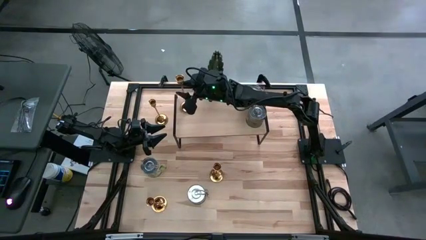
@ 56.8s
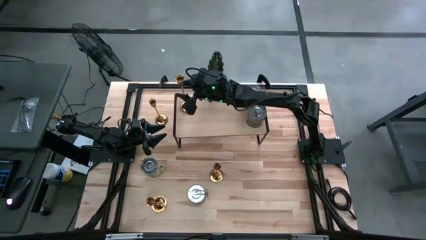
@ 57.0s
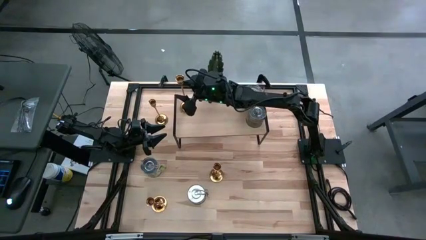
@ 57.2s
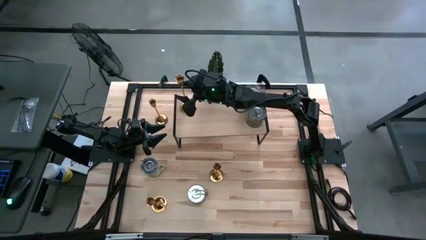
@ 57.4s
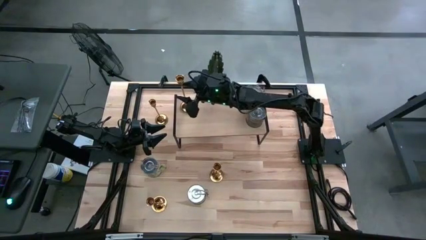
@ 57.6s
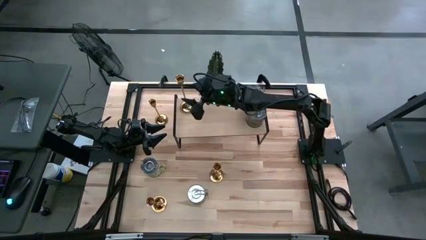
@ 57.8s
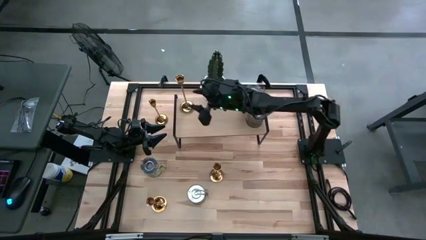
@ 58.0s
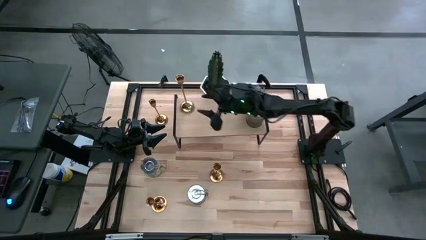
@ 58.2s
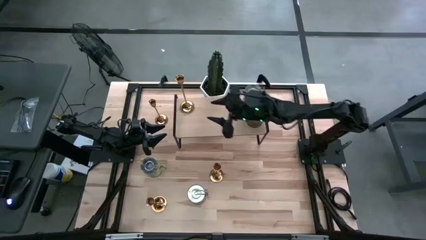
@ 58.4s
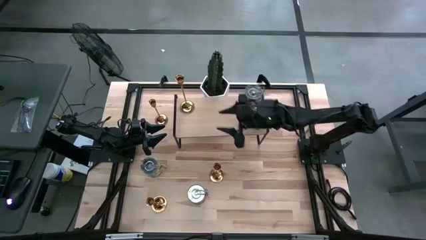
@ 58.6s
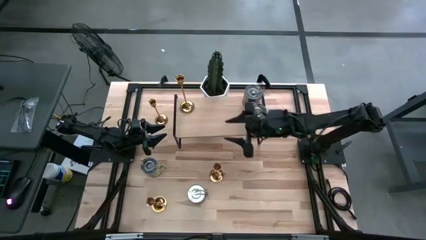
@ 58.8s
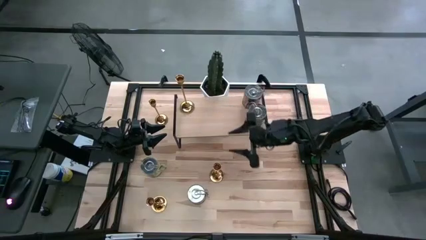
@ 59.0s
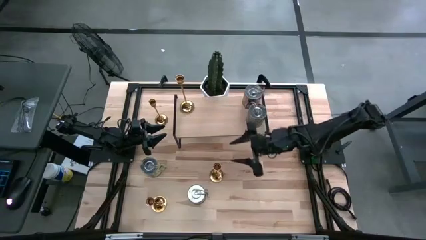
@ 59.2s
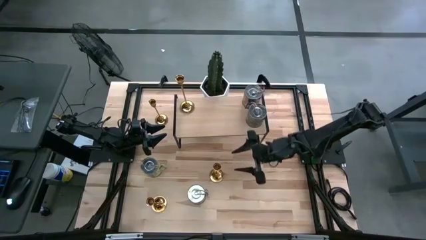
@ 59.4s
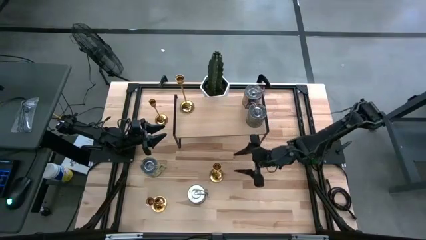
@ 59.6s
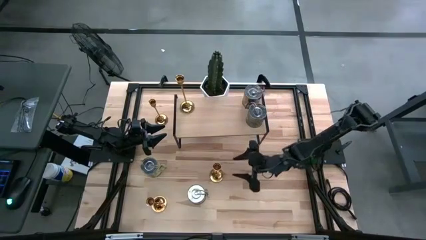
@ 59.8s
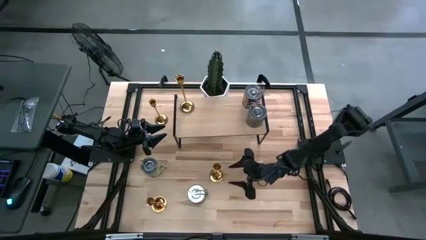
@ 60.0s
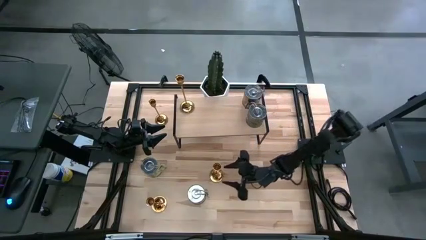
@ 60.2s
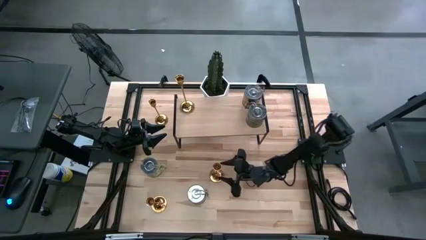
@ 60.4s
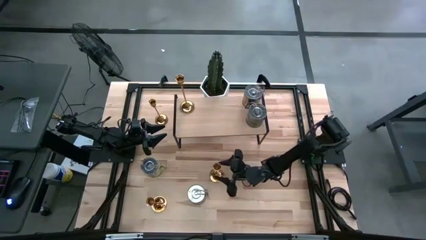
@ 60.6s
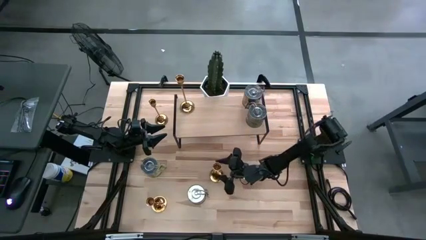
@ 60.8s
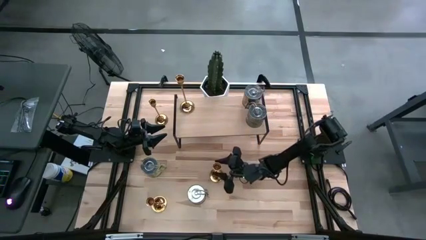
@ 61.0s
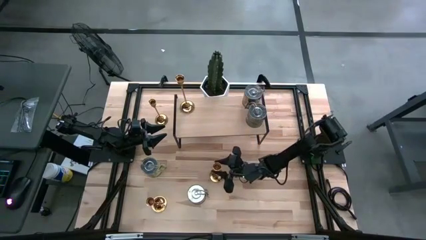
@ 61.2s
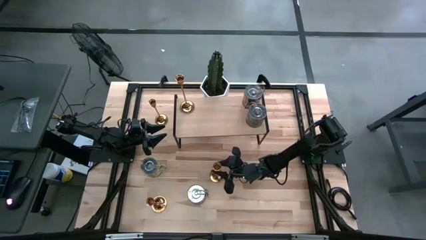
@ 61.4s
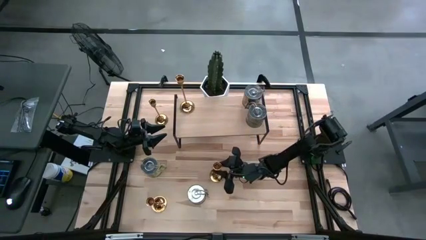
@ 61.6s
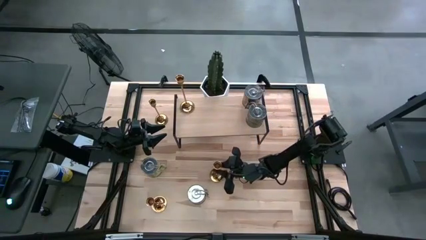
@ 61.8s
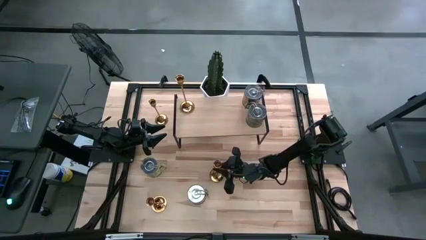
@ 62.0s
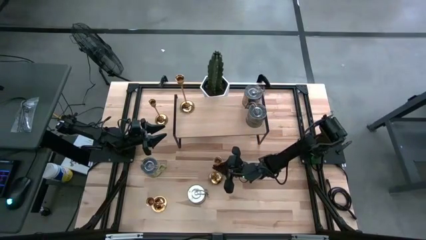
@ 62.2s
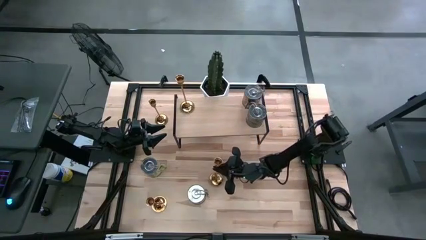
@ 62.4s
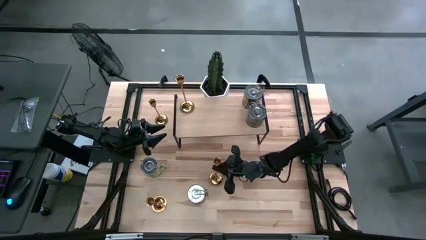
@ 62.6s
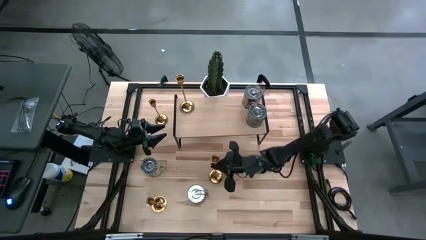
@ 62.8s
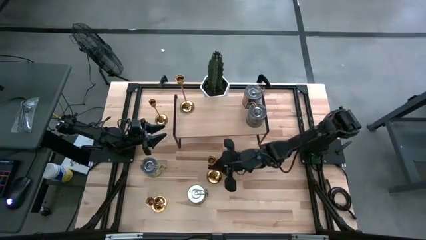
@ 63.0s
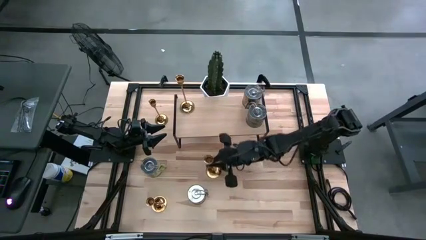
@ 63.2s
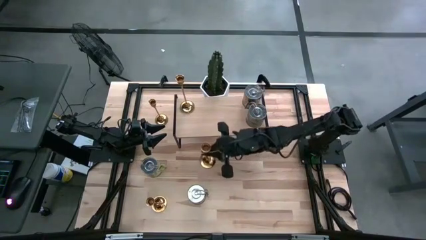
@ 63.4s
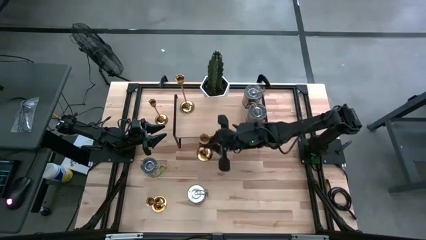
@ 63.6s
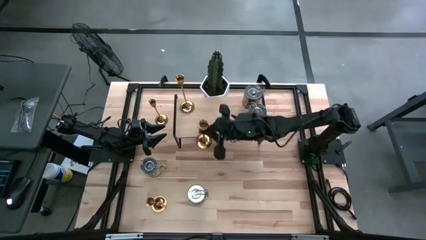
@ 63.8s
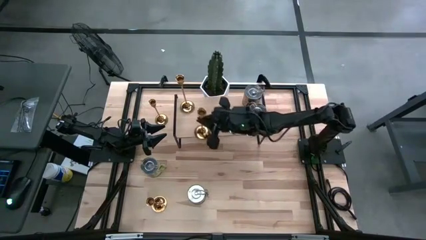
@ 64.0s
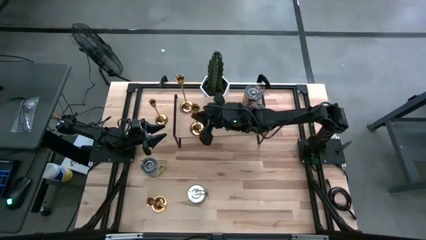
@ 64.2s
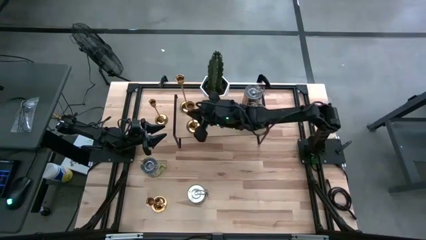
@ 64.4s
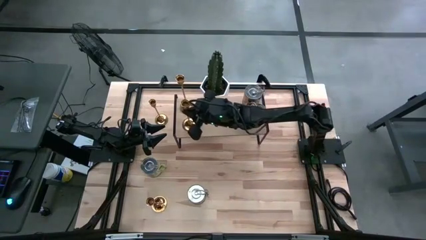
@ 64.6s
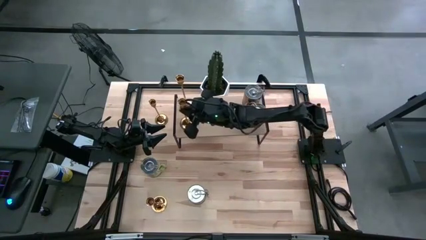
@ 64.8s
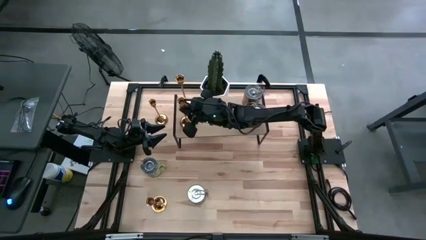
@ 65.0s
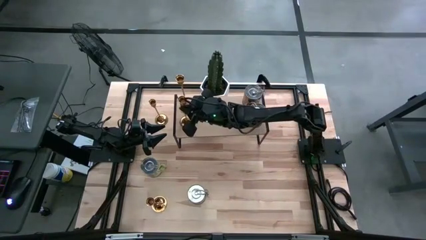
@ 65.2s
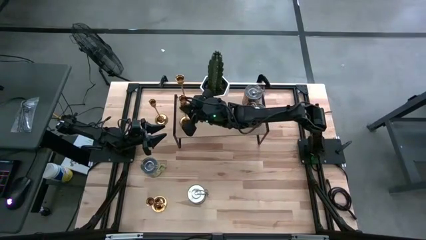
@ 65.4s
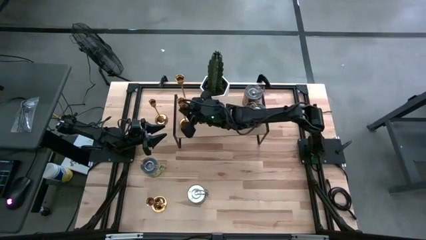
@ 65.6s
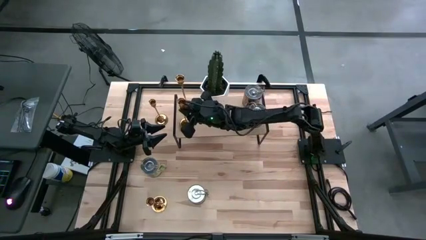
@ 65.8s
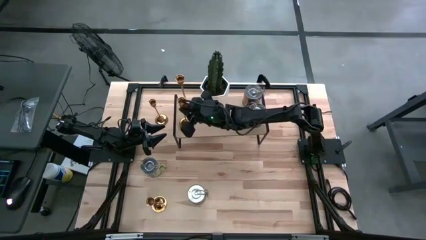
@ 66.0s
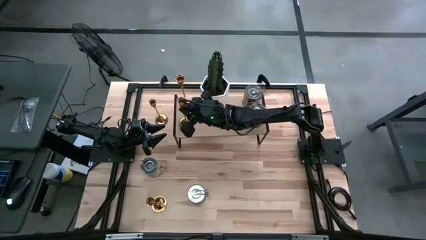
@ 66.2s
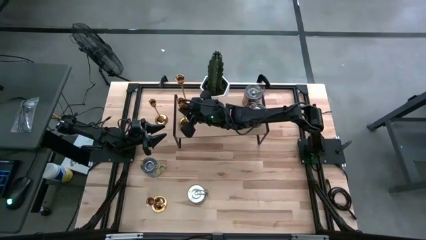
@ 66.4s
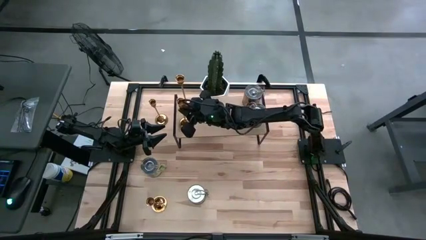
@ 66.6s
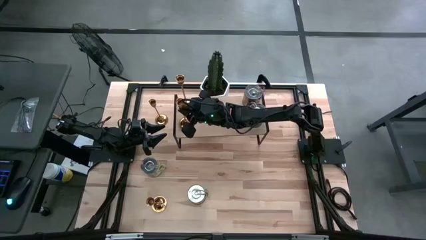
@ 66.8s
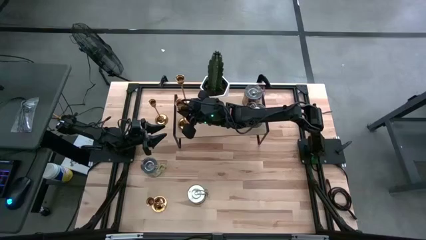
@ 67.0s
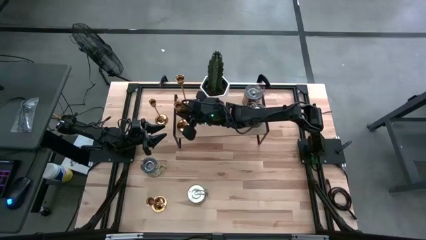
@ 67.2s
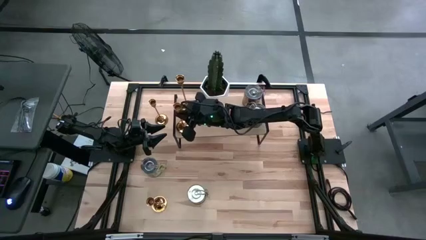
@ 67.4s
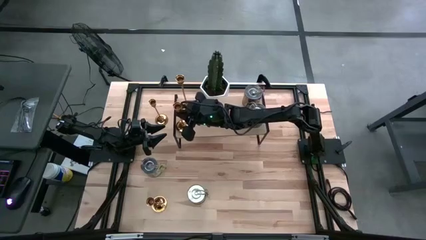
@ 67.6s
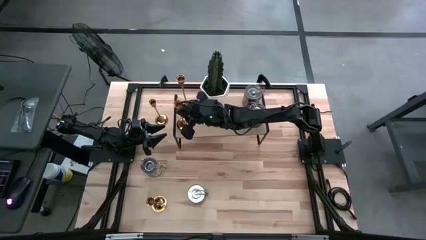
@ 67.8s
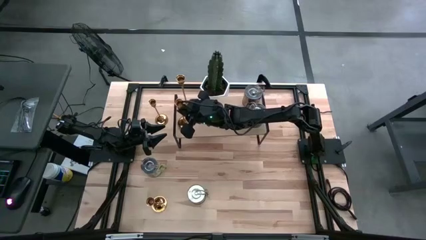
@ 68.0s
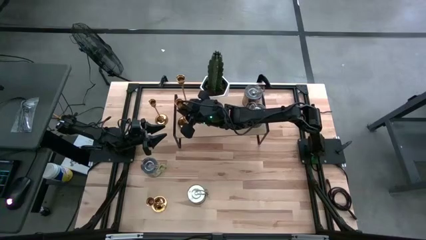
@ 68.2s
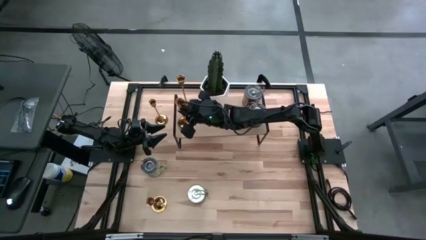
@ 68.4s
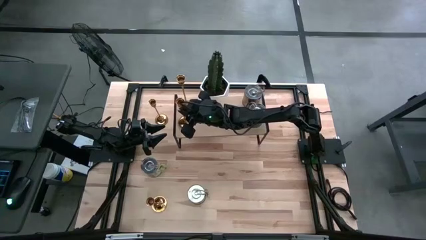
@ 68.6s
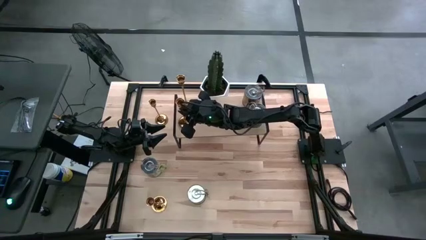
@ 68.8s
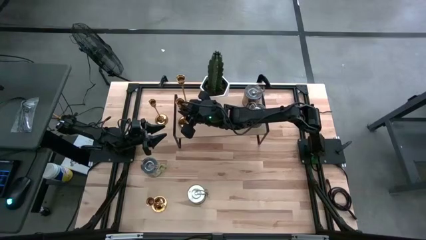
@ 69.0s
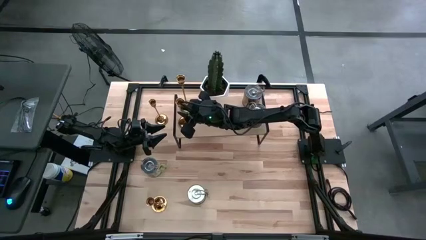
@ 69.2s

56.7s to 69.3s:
Task: Pick & Place candle stick holders
Put the gold candle holder on the shelf
